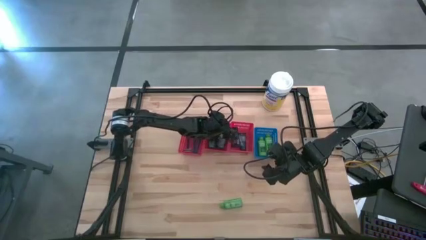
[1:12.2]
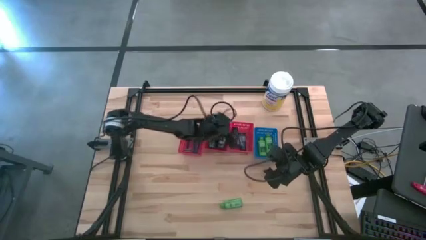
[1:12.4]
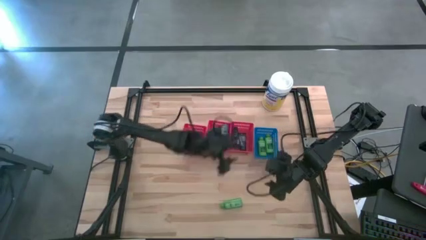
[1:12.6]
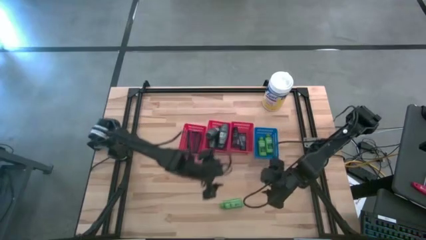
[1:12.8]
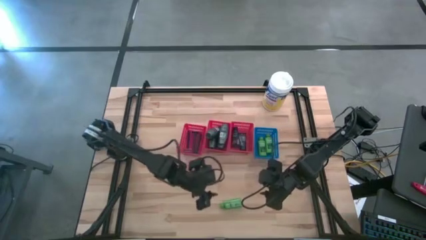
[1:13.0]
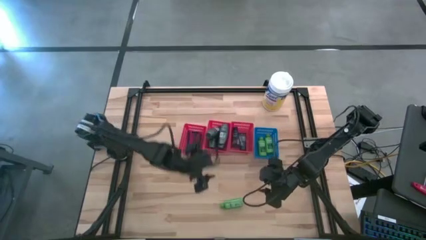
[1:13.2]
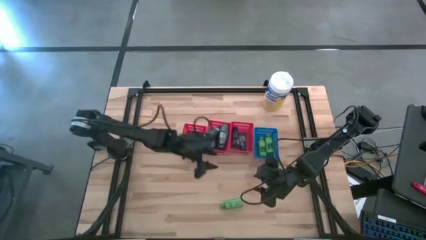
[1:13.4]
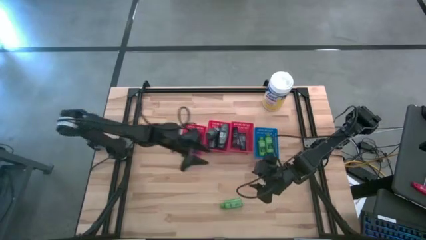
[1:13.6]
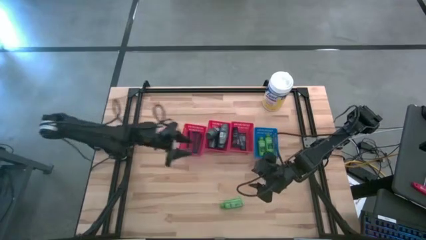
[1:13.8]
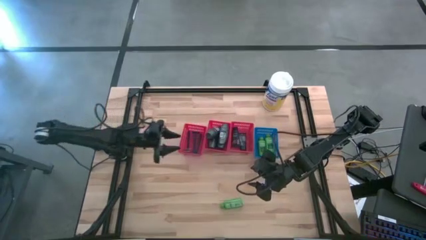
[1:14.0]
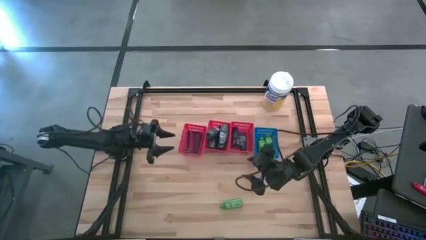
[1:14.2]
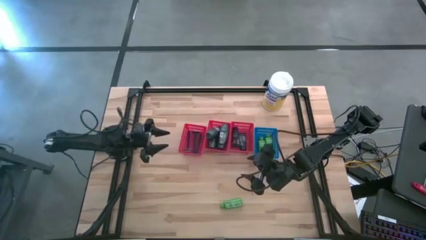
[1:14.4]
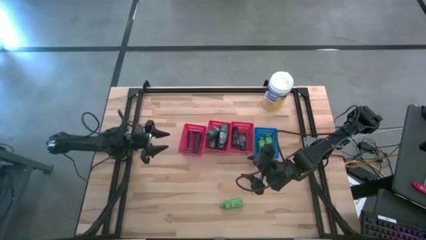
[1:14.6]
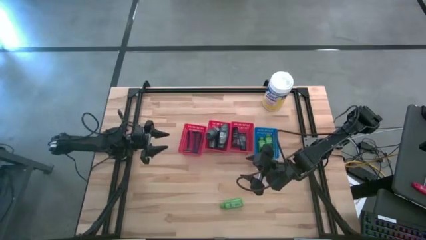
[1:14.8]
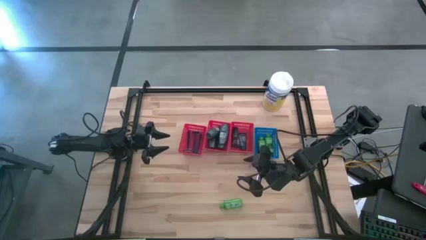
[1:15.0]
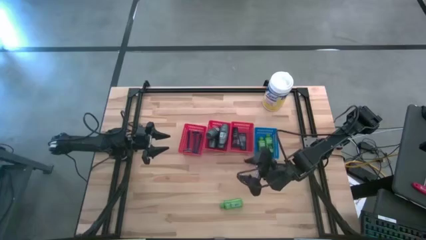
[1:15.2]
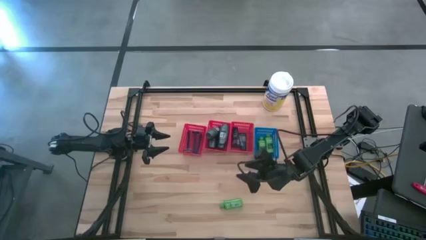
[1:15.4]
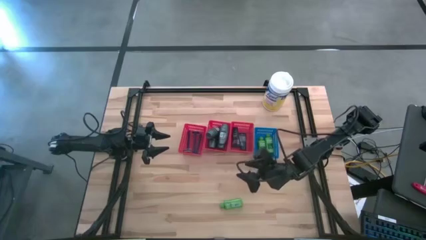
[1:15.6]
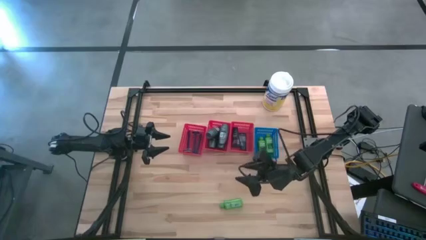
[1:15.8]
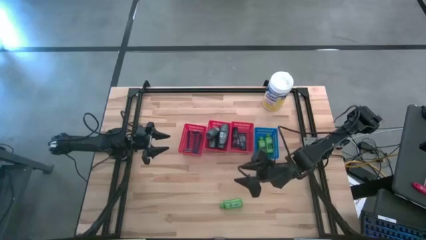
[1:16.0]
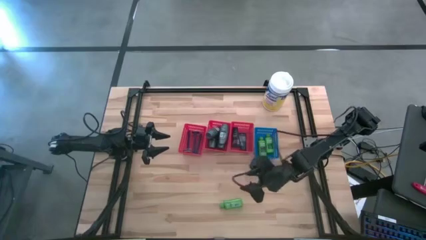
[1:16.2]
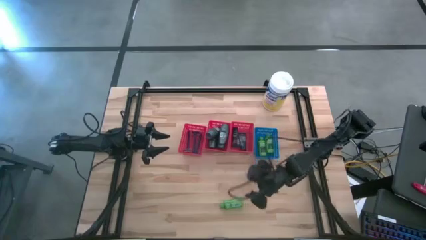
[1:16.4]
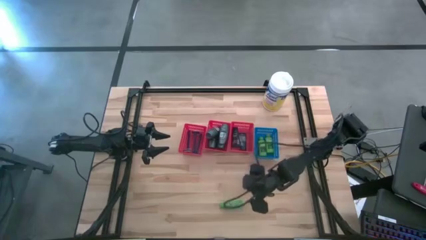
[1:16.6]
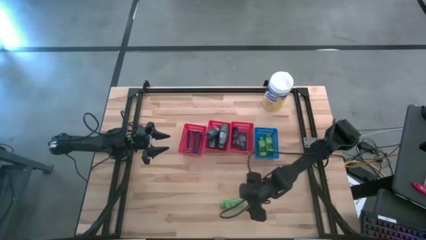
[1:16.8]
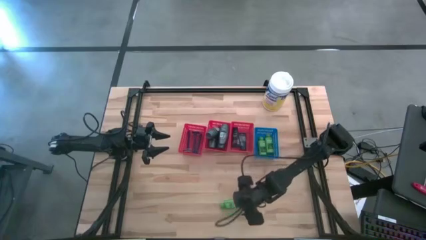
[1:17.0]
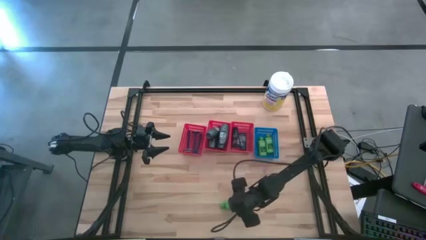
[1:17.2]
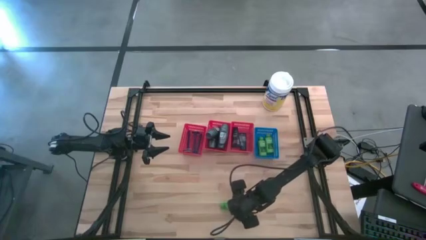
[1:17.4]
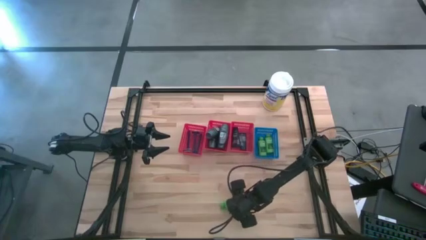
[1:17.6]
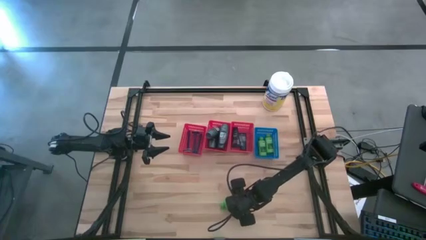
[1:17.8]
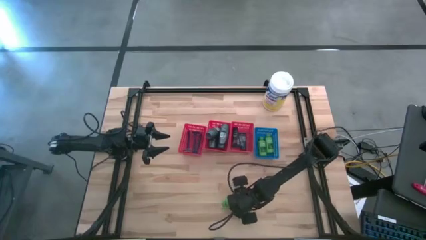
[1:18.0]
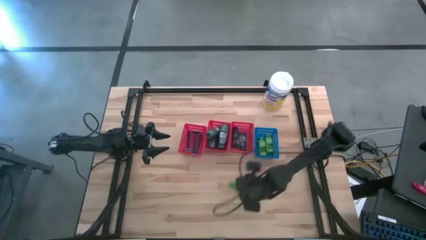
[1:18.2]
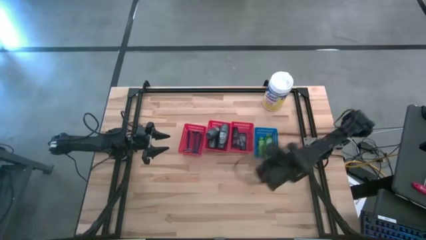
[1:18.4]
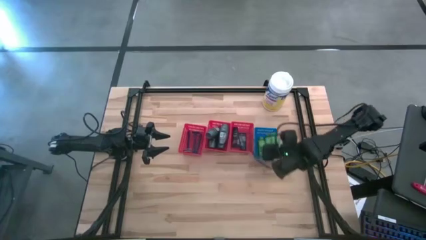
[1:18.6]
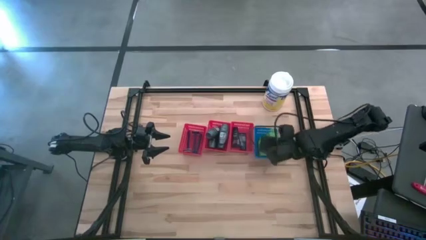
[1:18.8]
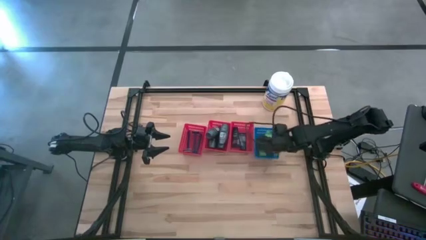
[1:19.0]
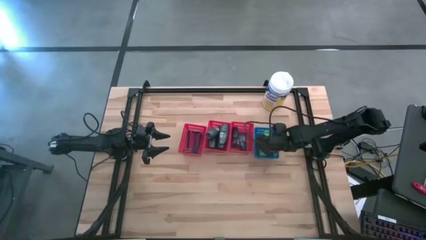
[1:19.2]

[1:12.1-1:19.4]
Task: Pick & Place Travel size toiletries
Put the shampoo into the blue bin

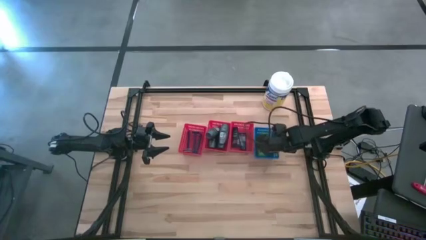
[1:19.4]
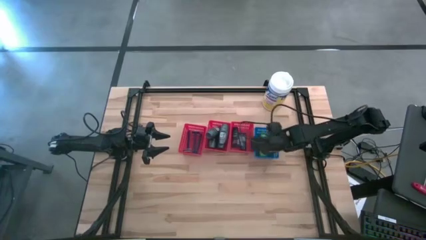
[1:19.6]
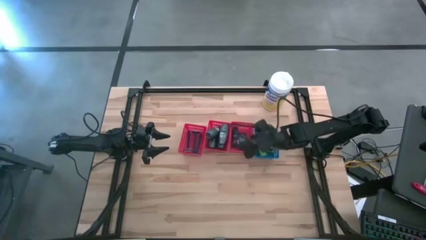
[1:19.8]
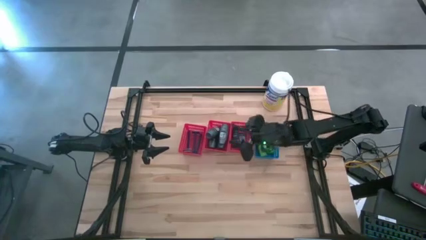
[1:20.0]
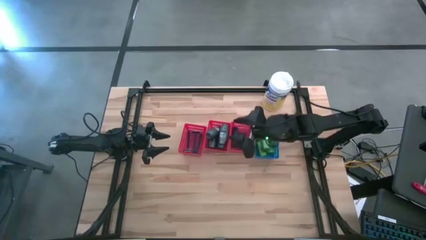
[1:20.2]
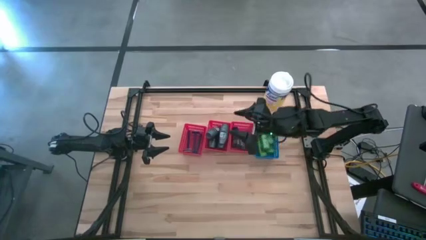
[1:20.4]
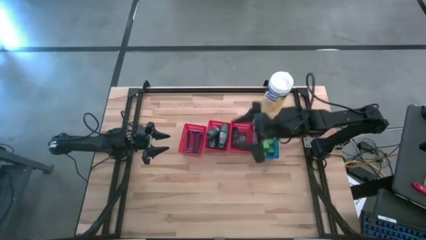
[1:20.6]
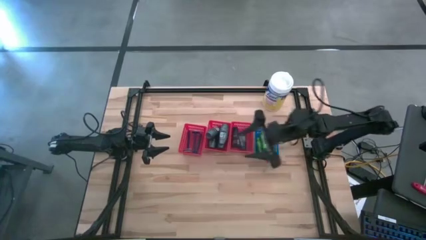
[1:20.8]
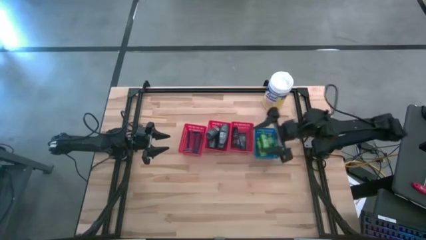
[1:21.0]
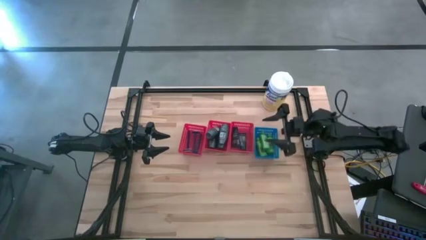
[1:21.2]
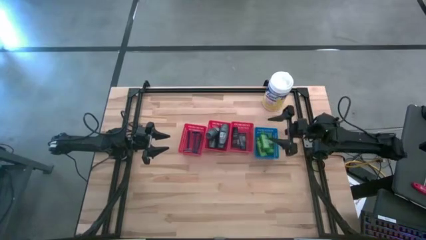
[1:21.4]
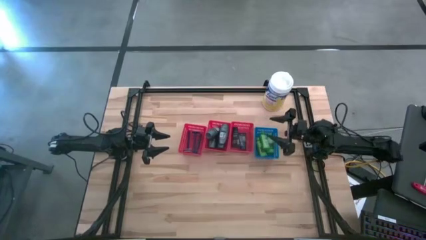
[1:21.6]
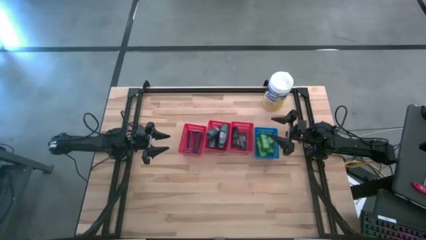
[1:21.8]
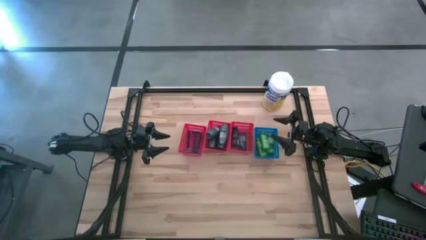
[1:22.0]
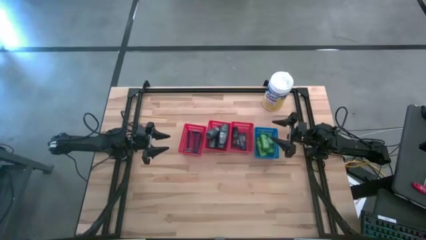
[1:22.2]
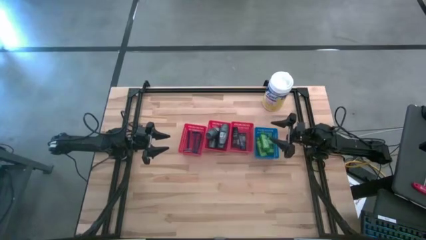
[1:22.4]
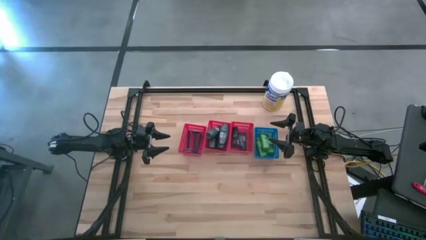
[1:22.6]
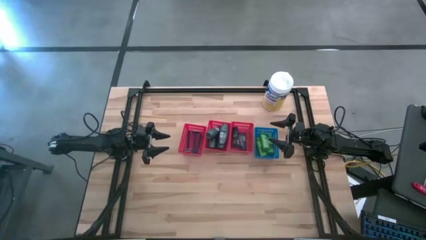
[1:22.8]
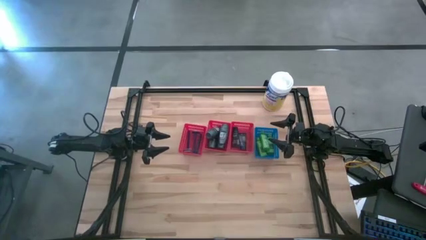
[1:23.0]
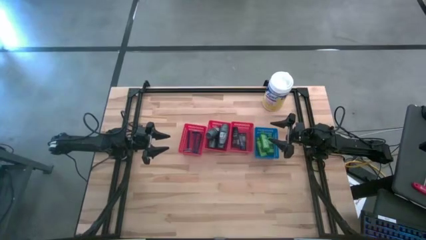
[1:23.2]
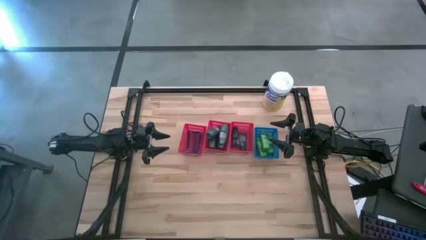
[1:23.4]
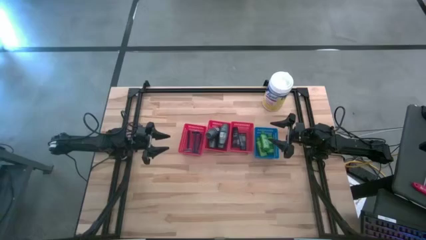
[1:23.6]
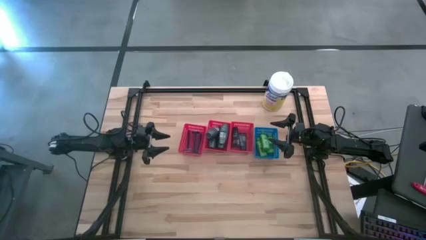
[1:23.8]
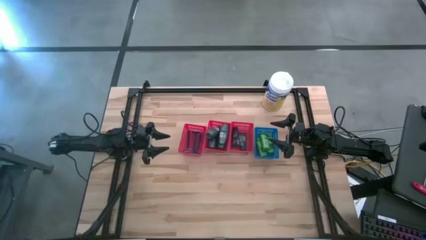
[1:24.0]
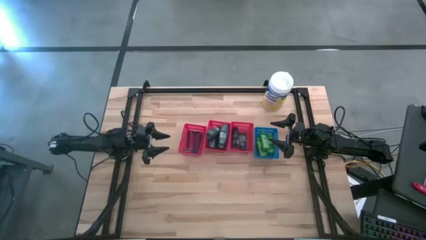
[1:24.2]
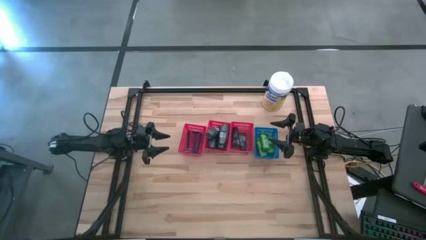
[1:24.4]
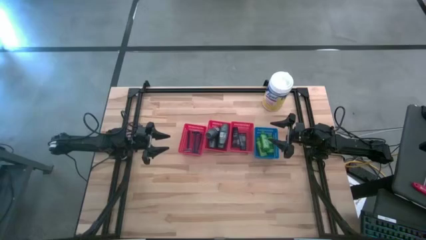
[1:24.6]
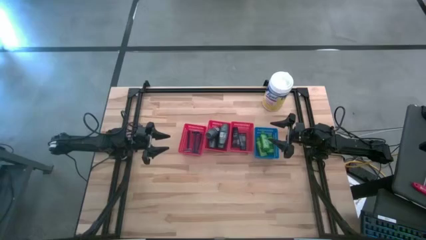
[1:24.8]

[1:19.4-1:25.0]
Return to home position
